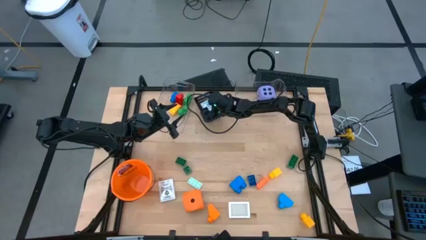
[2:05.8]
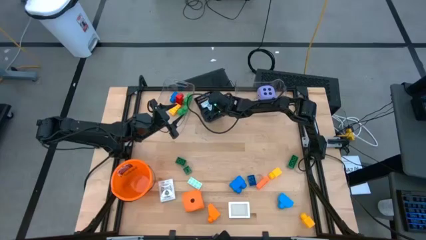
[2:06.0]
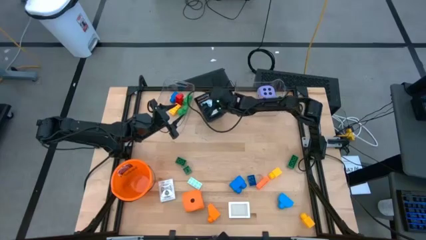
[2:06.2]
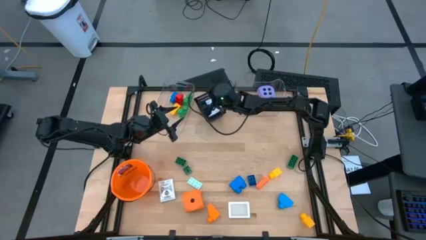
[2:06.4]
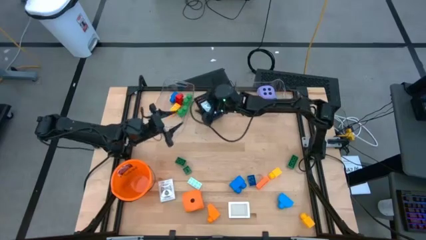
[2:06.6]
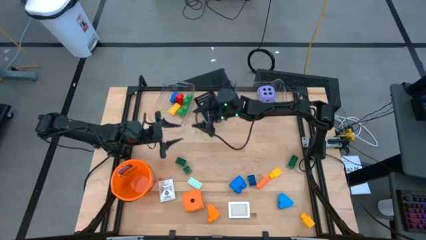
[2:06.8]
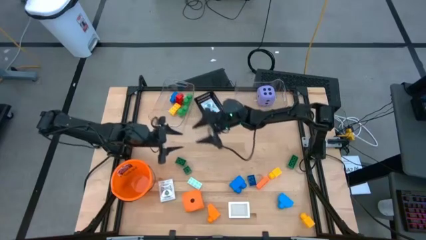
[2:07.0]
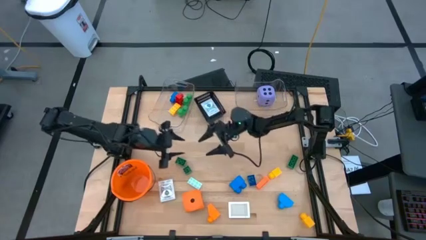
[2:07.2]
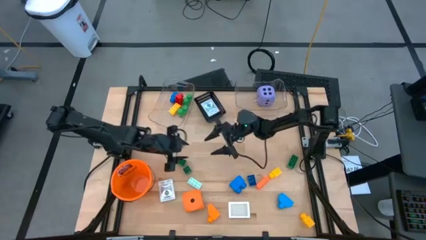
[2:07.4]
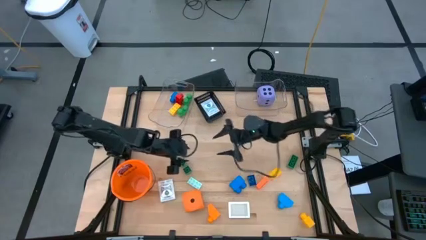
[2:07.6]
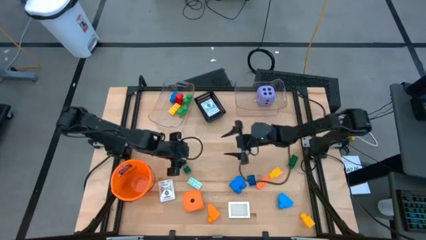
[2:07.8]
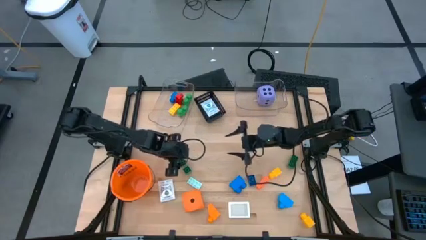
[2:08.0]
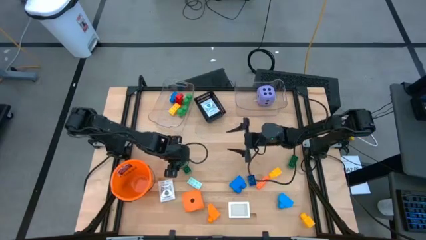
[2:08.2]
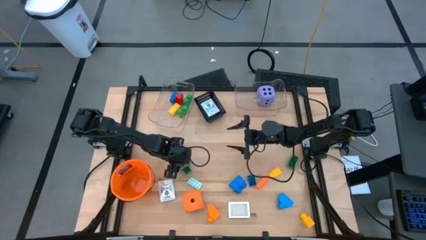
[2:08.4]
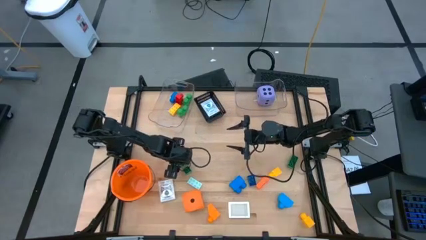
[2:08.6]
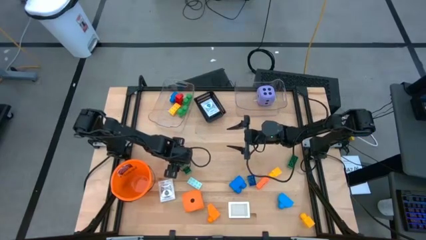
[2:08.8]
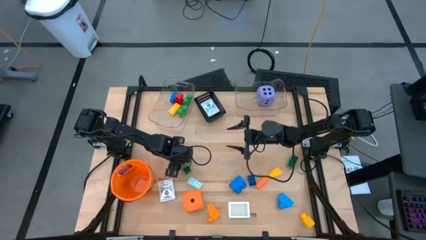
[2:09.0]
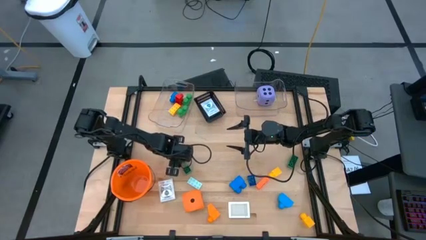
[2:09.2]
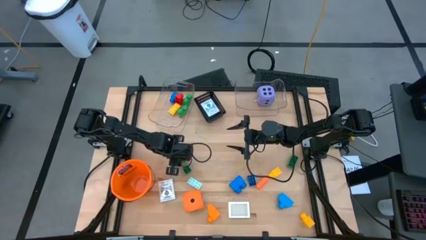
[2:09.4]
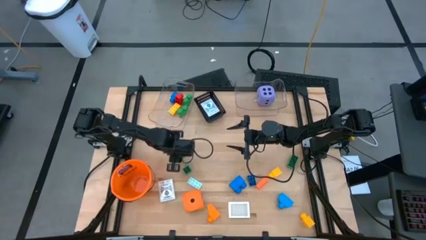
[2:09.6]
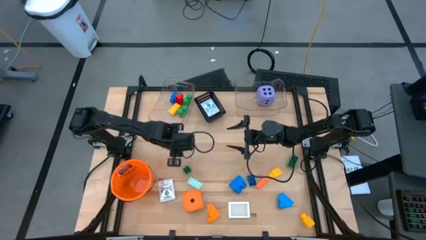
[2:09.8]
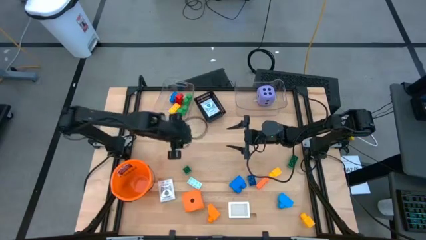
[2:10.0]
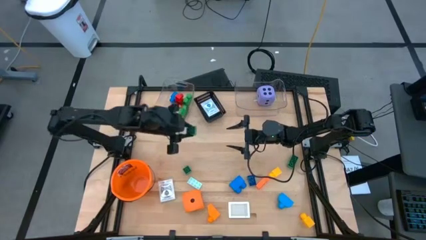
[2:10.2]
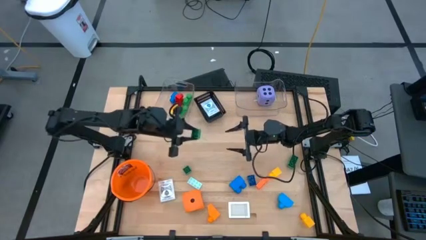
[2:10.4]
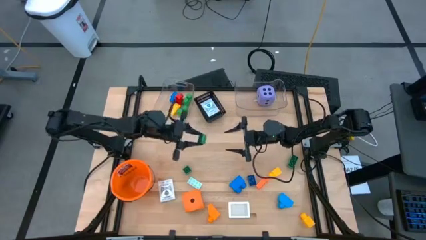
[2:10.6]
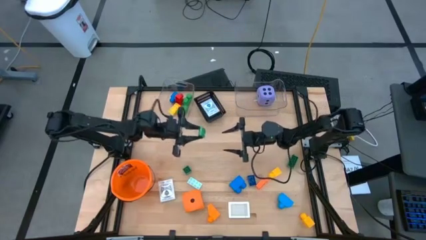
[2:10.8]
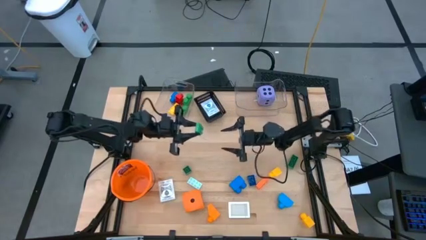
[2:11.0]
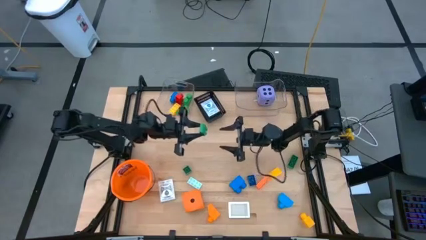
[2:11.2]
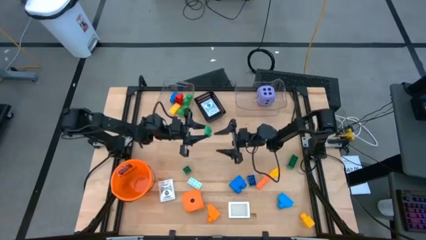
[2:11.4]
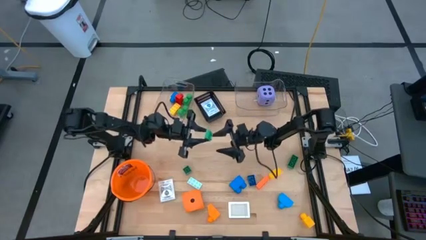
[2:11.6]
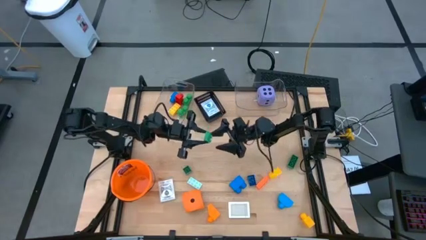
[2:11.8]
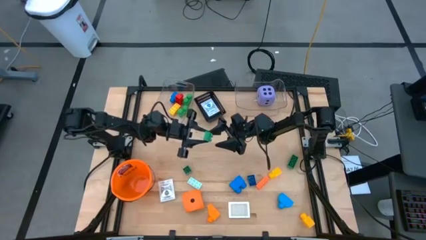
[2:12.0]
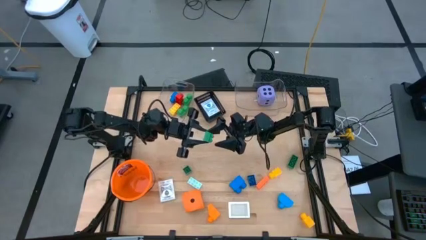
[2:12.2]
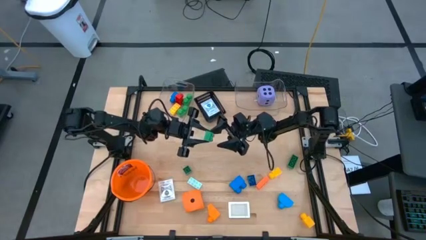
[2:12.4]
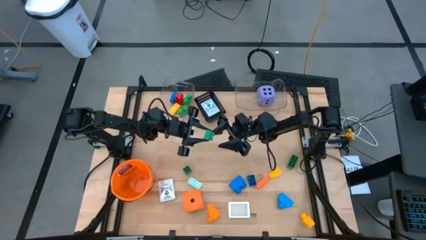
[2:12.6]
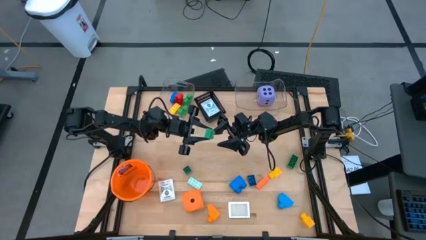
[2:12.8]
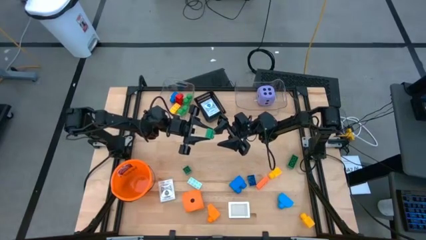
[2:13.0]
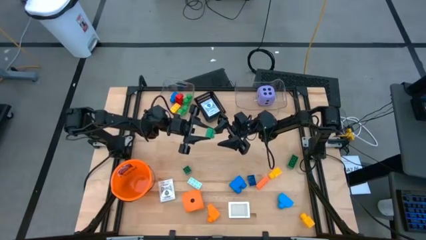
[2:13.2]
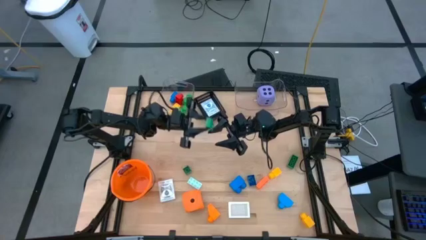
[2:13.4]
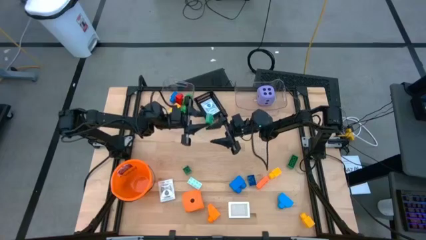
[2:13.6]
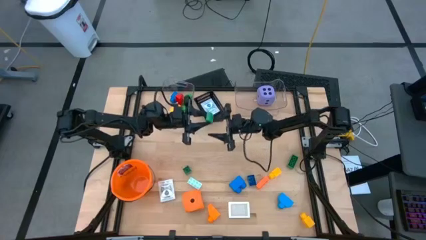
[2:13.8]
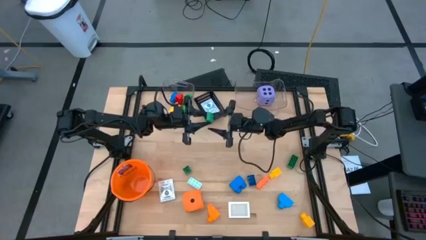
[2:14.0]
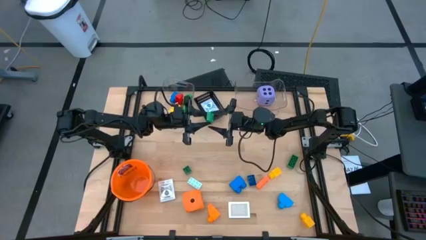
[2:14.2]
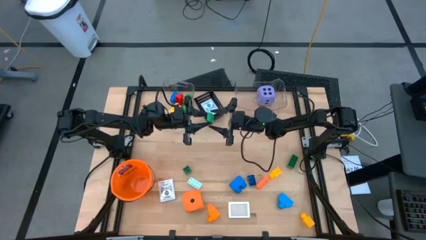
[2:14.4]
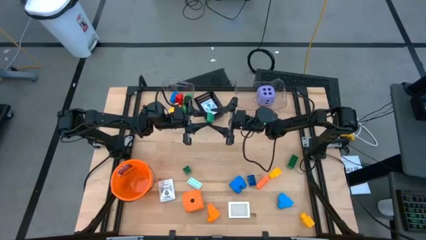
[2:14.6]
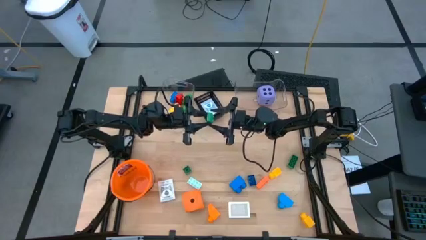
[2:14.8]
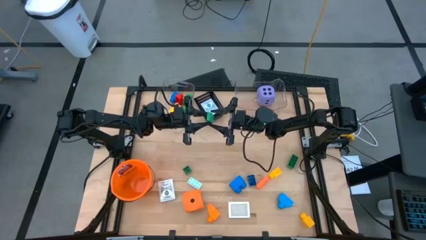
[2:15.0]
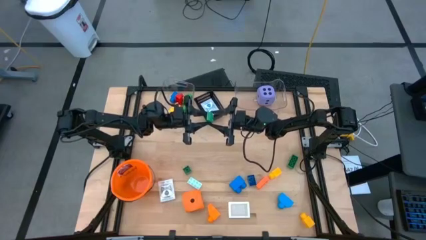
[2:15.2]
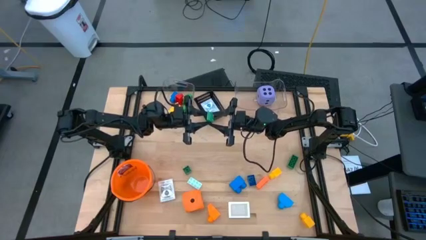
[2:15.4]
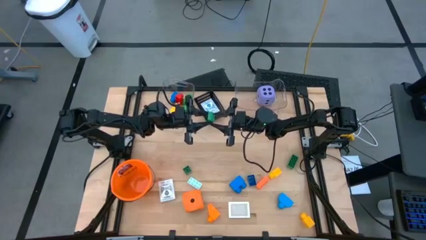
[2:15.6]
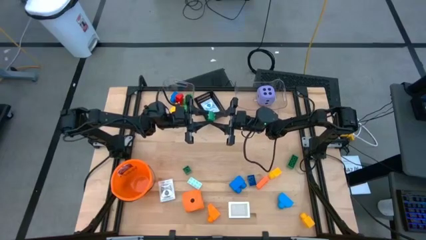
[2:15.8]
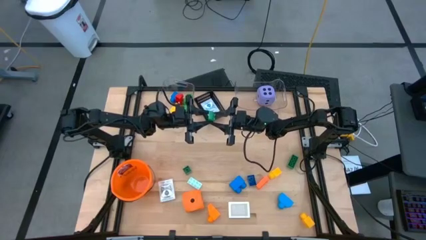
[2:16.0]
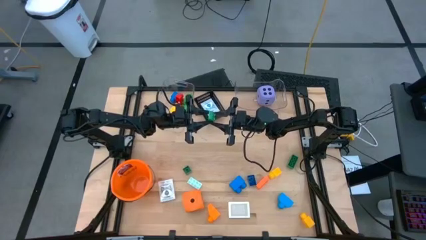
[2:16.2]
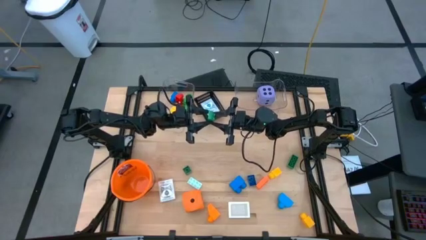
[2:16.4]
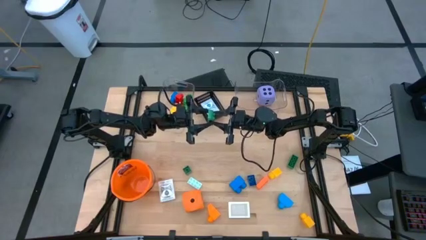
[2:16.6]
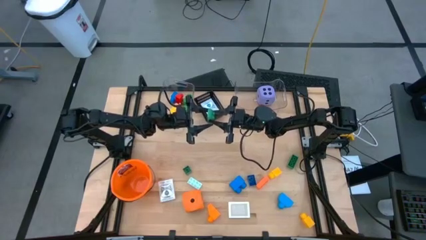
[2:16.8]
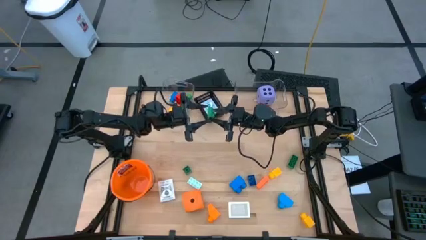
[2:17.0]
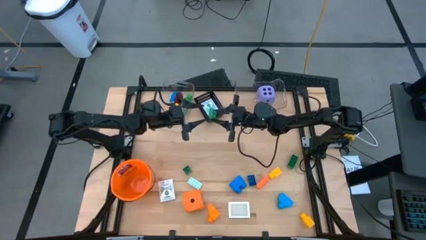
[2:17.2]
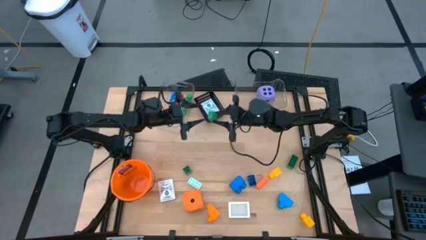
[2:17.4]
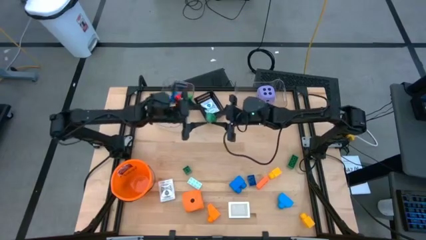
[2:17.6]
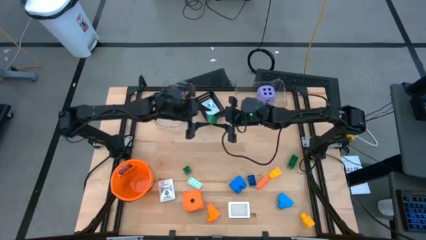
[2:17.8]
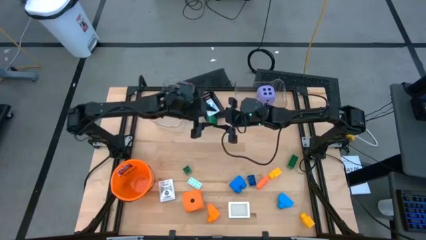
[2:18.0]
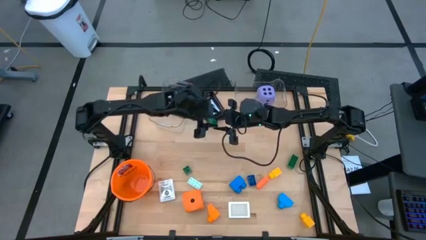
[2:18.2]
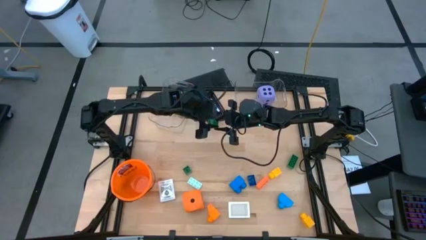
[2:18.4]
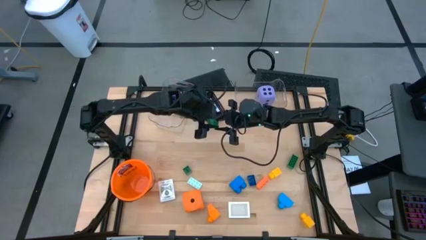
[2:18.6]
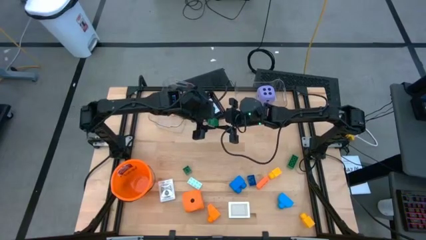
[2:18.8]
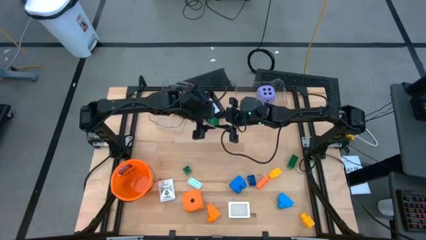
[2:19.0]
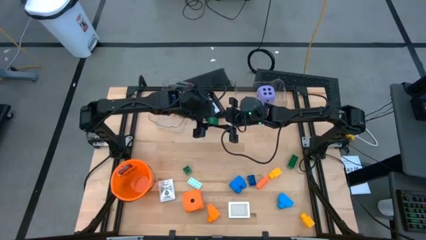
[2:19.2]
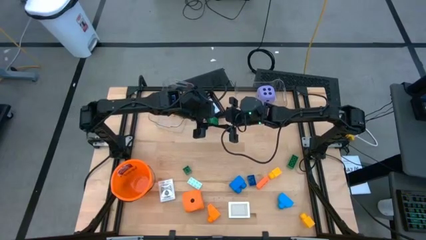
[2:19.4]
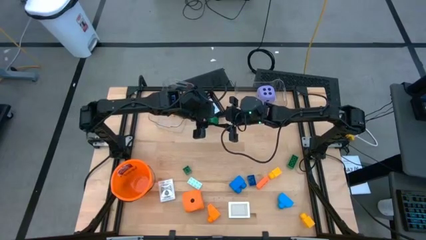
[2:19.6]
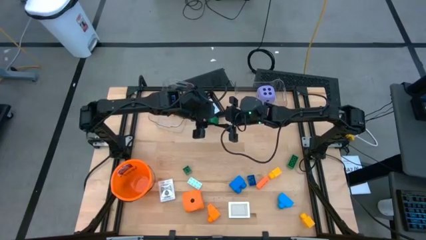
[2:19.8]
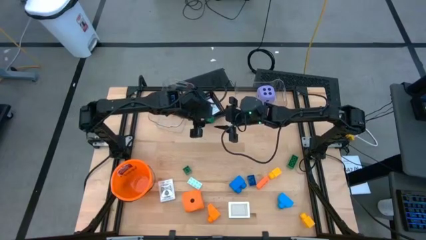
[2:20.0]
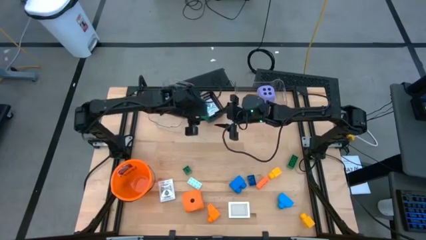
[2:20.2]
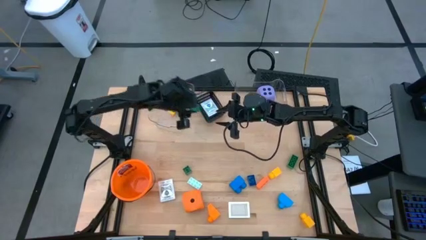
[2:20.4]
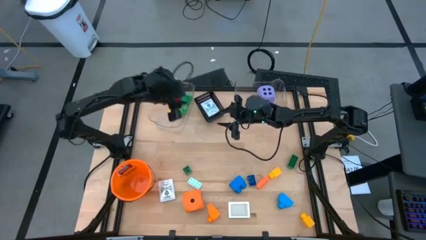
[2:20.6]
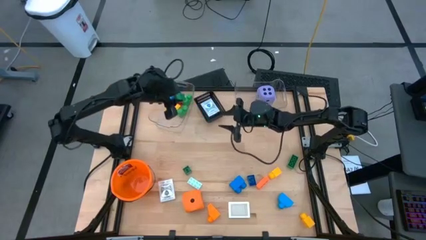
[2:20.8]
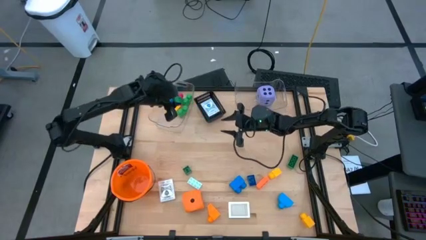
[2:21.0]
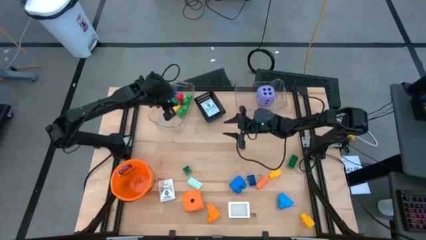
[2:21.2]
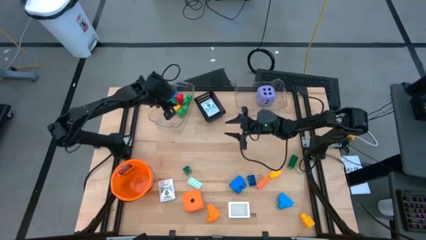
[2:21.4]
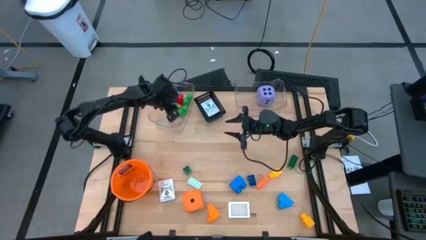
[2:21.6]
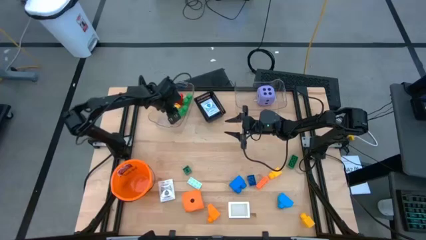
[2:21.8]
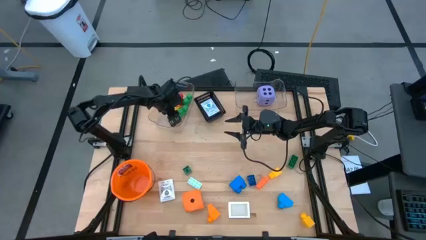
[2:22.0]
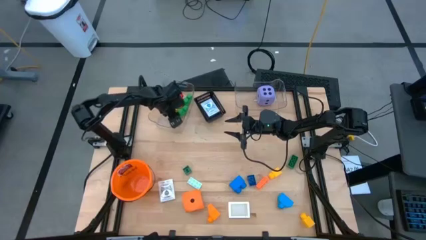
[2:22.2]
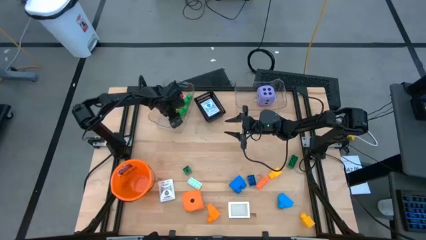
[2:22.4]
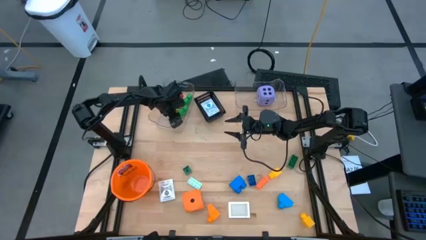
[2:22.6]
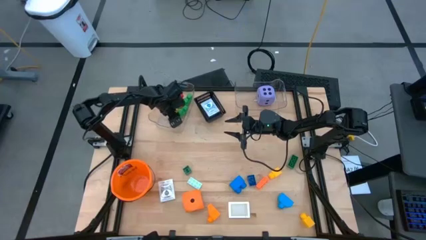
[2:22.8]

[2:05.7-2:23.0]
Task: Pick & Place Toys
Put the green gamepiece into the left transparent bin
